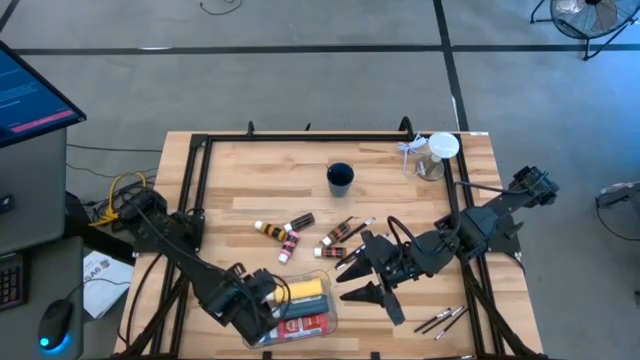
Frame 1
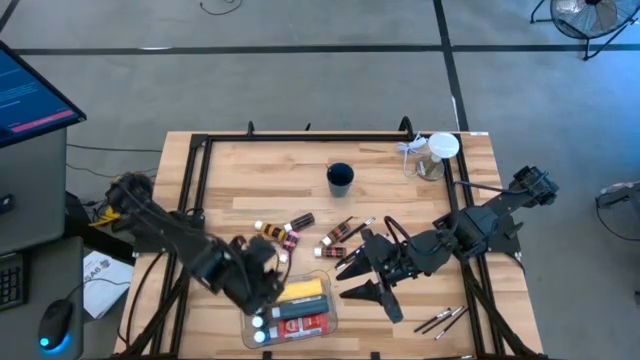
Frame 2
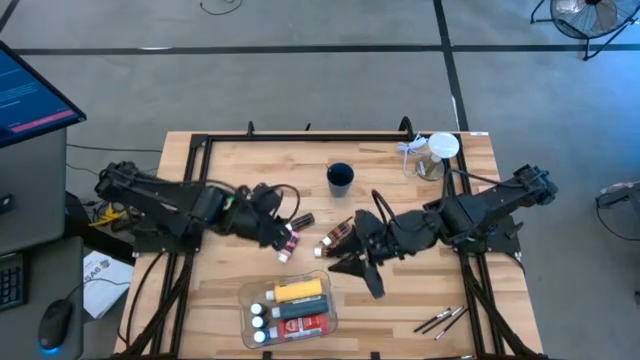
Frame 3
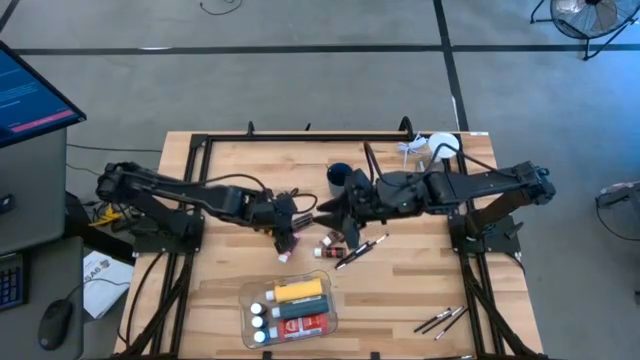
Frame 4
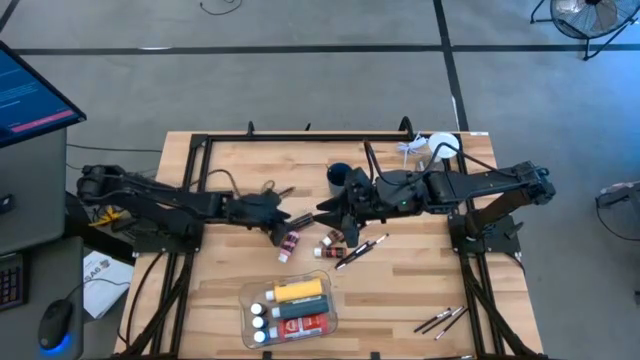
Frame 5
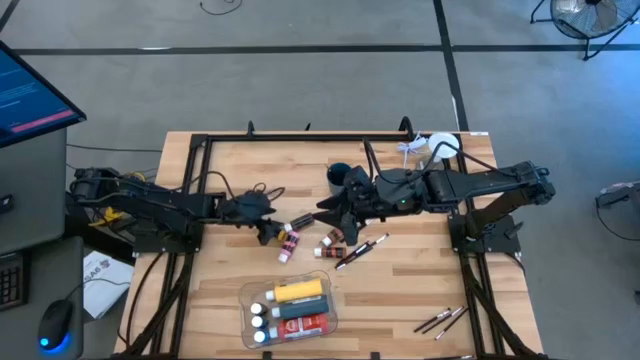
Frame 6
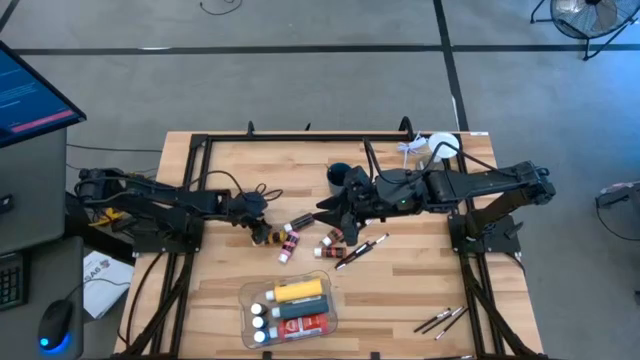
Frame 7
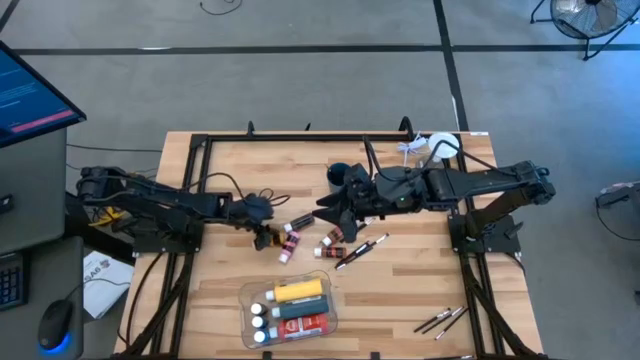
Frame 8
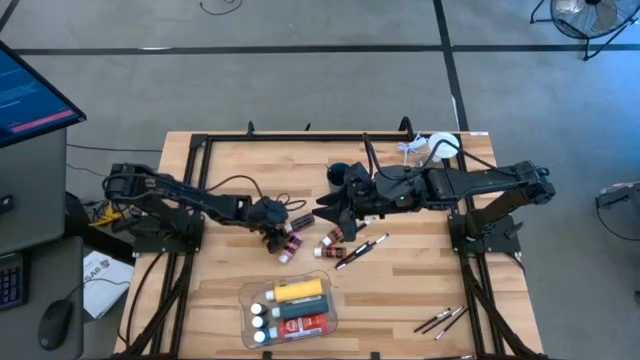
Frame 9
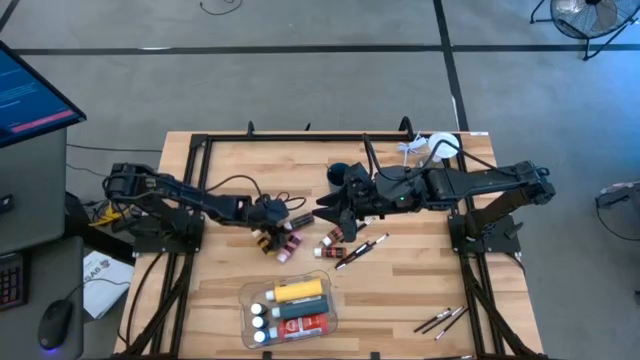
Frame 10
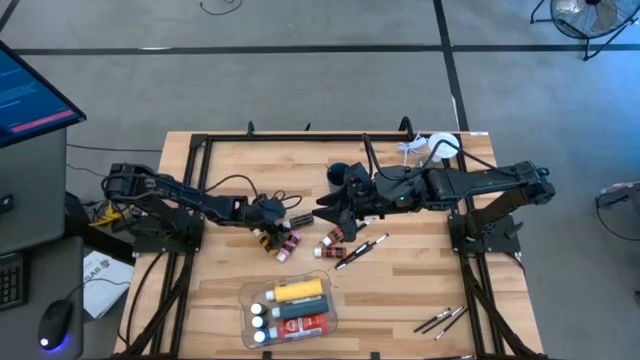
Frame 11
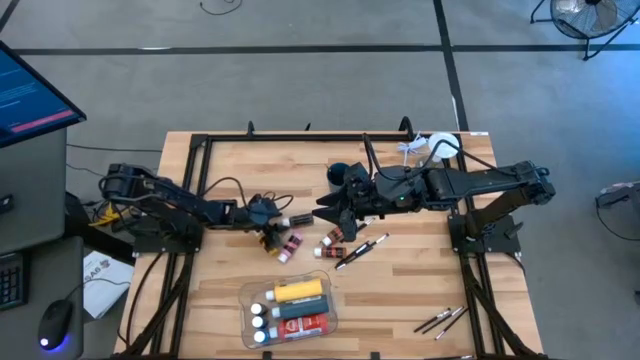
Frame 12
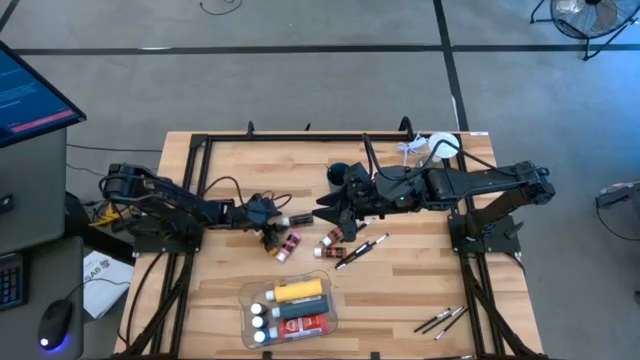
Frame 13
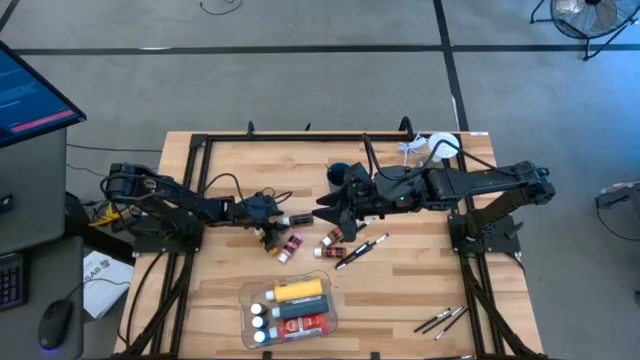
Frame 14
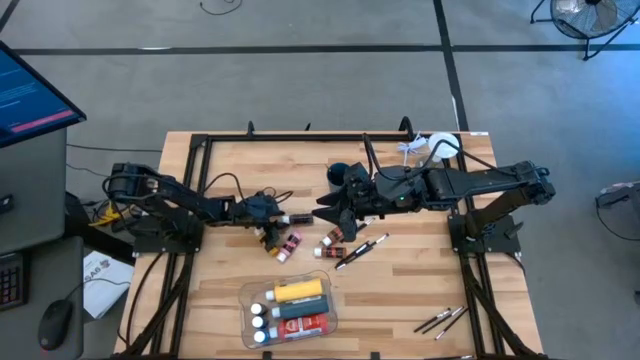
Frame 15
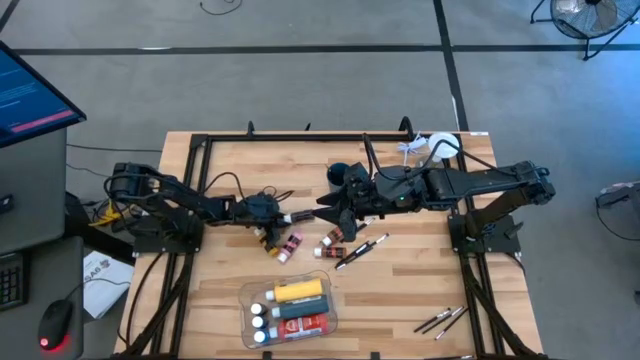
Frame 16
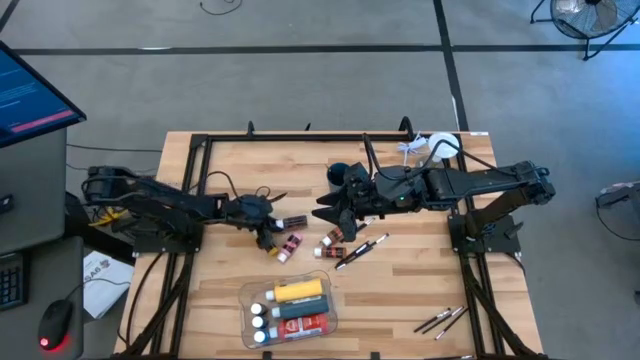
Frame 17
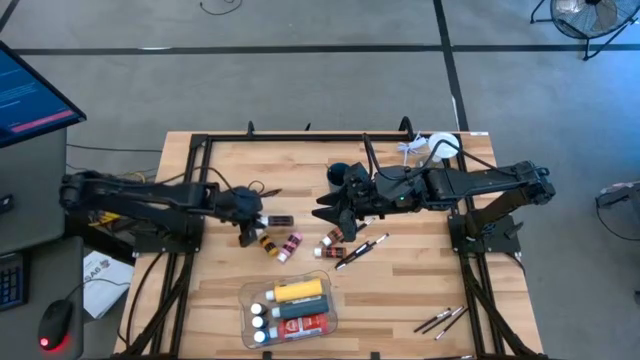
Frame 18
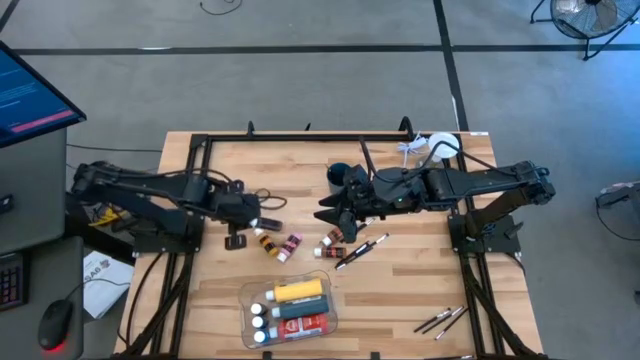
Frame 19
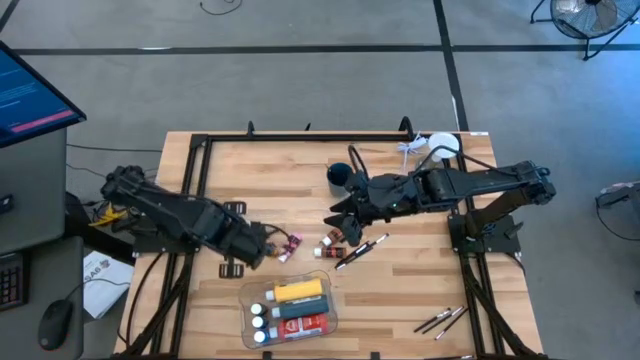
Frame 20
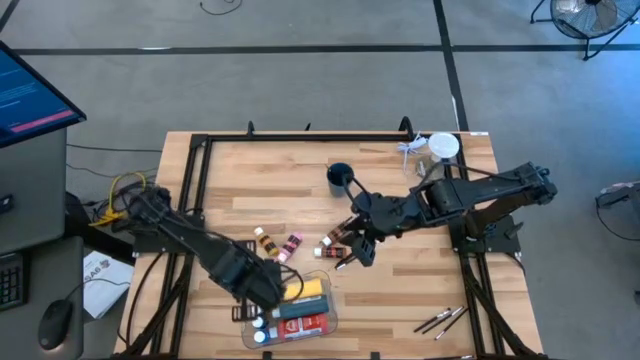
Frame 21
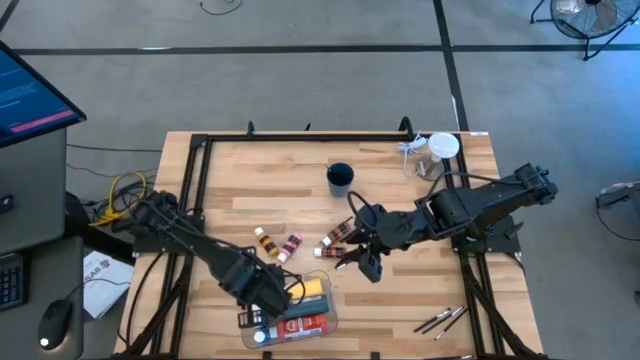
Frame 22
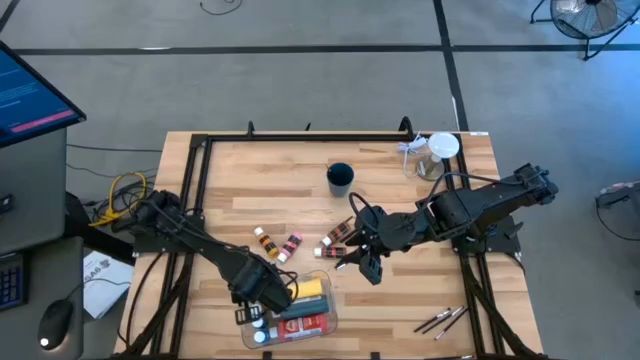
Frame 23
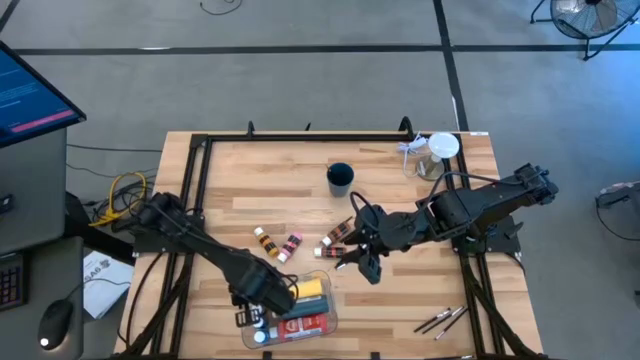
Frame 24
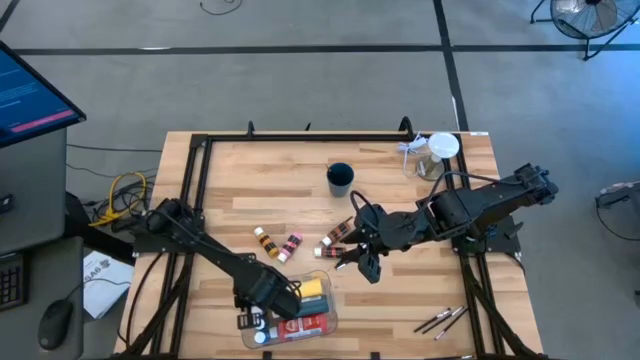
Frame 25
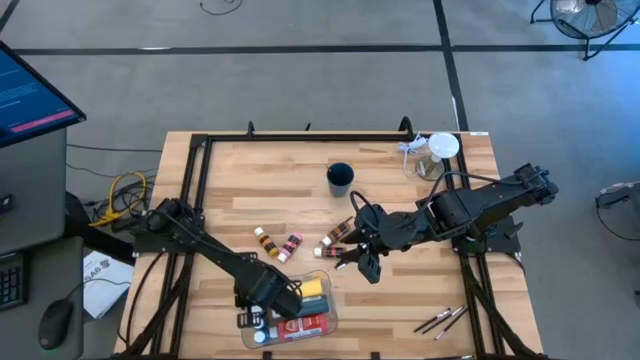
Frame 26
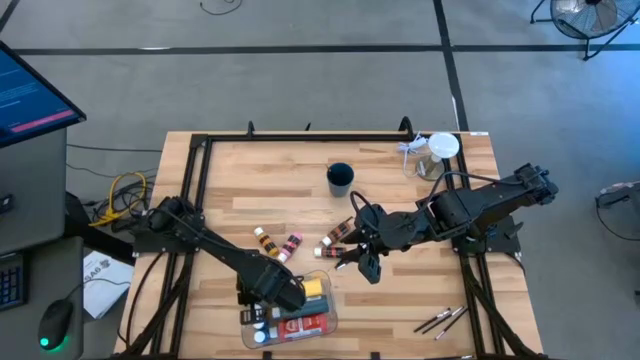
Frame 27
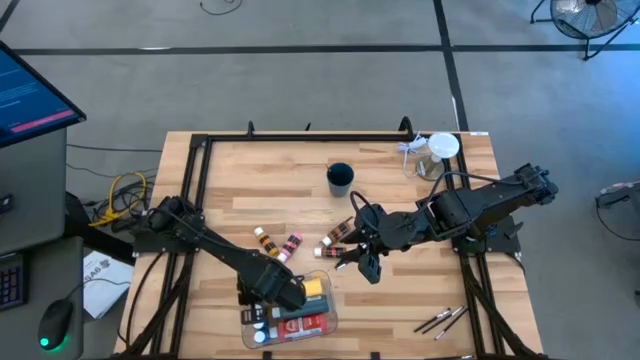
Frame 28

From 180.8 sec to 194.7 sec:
Task: Pick & Place Paint Supplies
Put the small brown paint bottle into the transparent bin

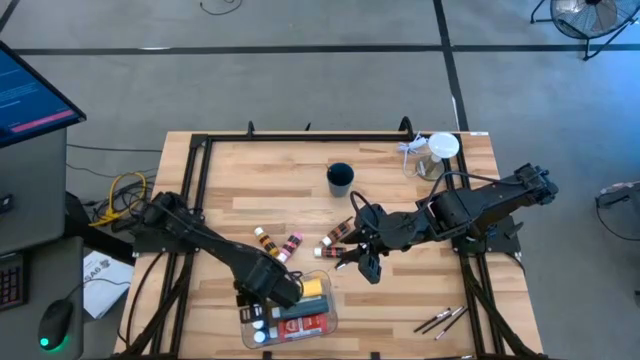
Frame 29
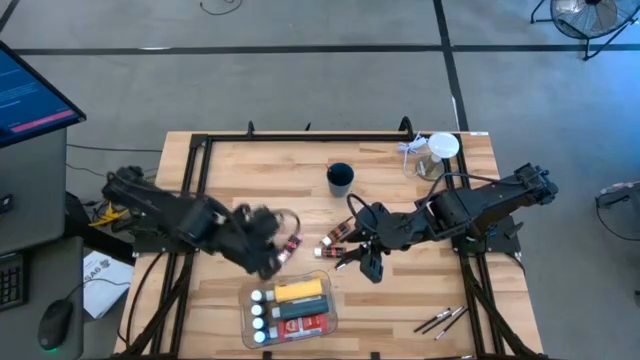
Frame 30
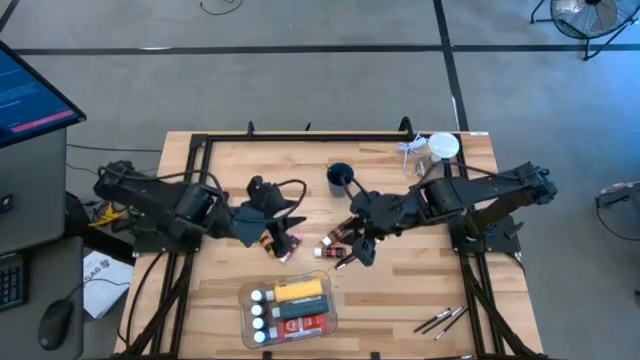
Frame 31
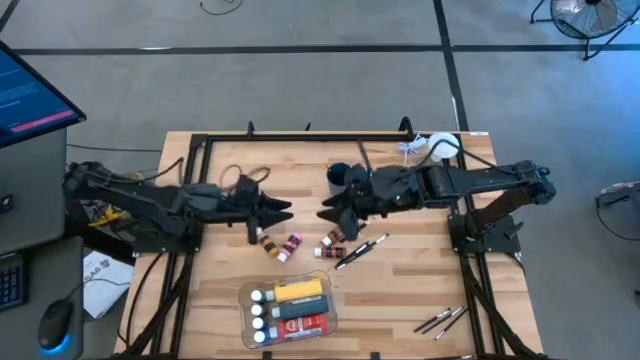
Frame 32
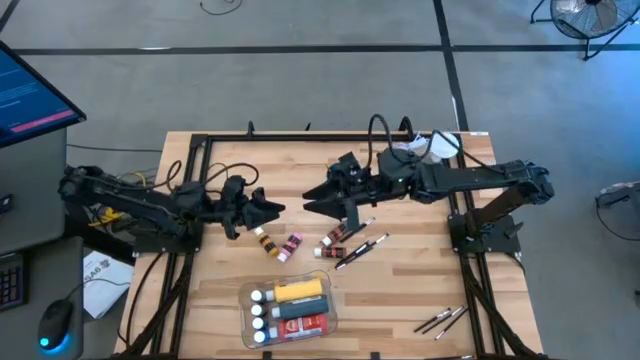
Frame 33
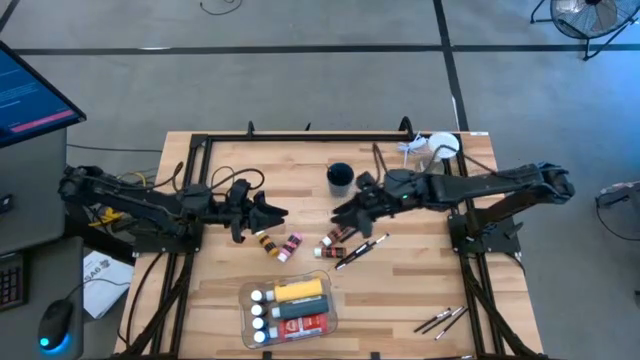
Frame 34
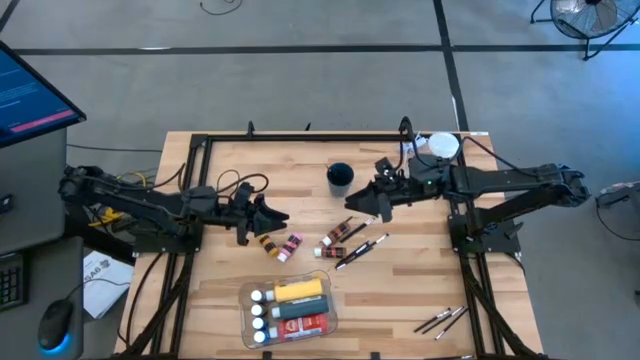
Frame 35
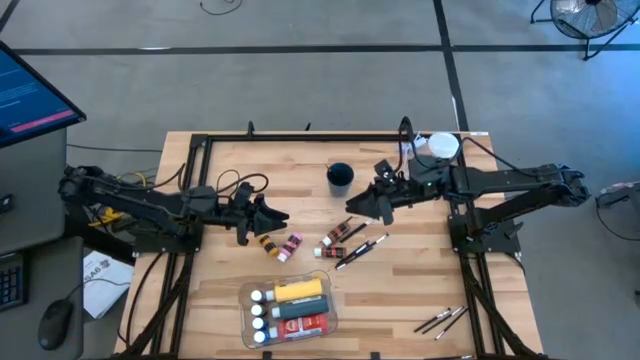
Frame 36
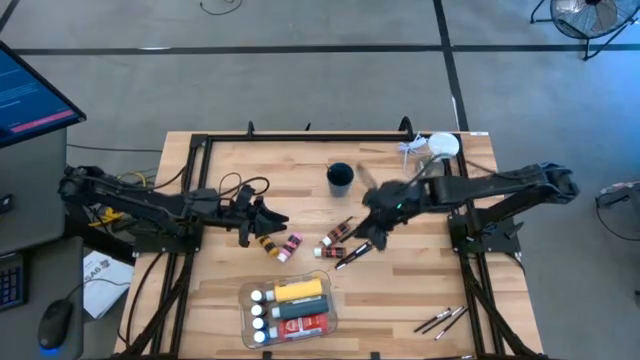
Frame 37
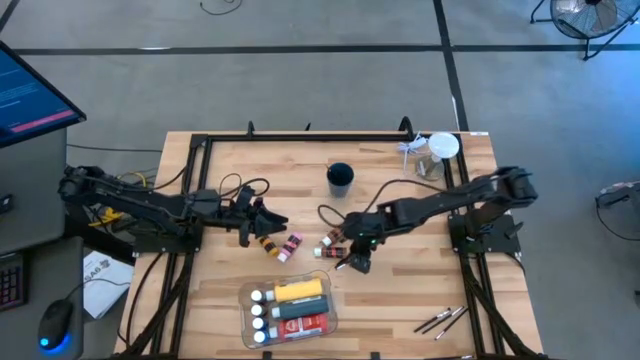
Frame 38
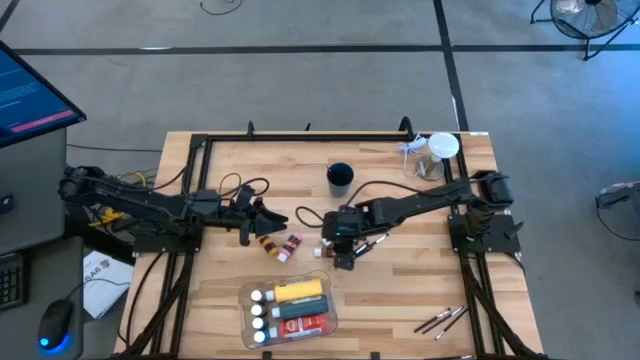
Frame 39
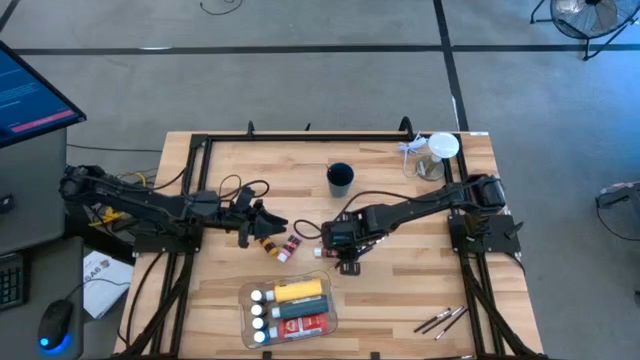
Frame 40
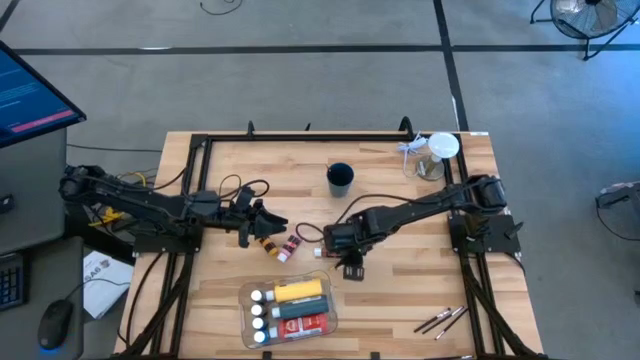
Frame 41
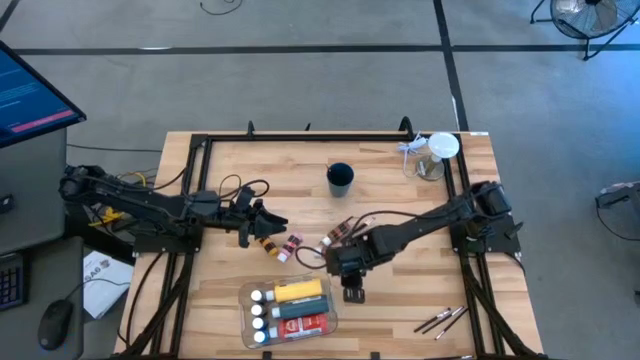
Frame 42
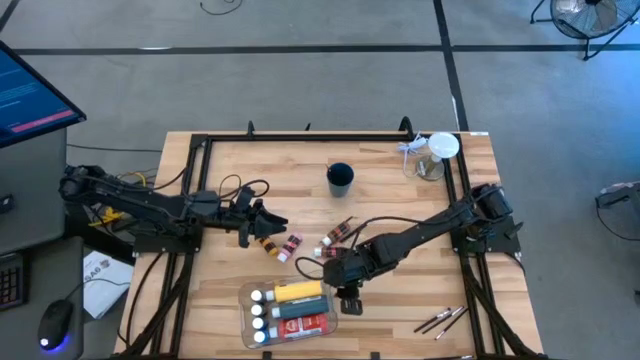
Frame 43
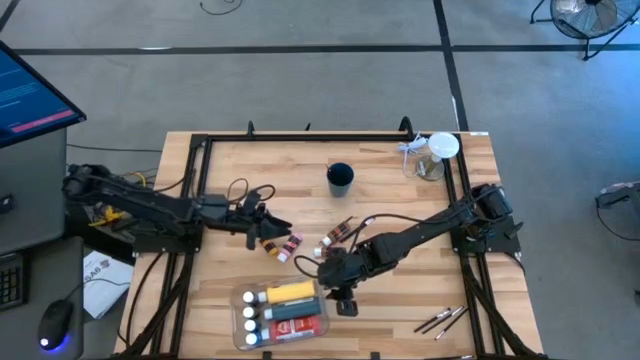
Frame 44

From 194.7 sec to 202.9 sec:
Adjust the transparent bin on the table
